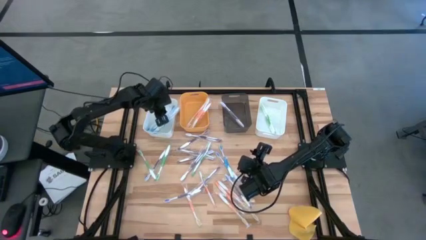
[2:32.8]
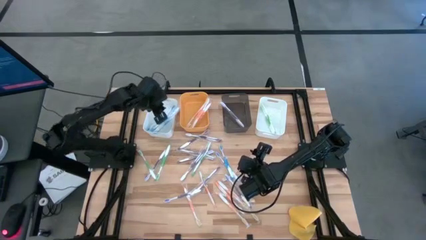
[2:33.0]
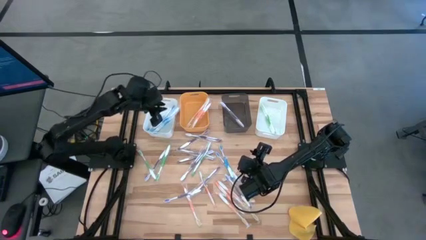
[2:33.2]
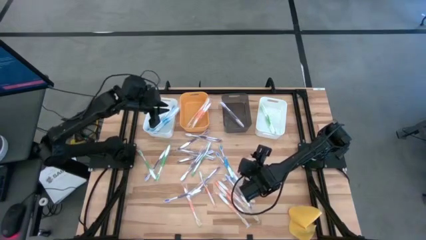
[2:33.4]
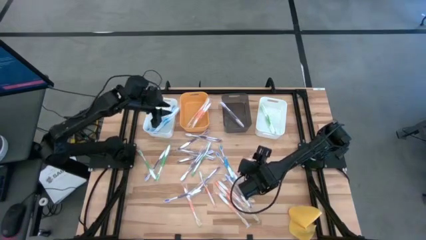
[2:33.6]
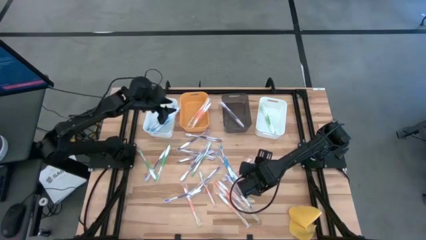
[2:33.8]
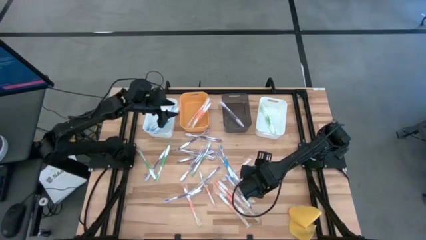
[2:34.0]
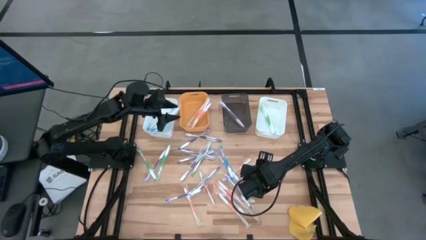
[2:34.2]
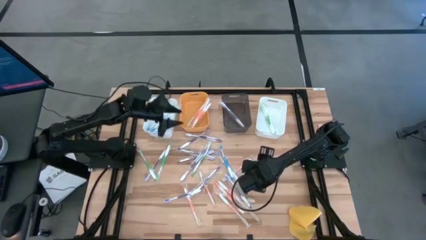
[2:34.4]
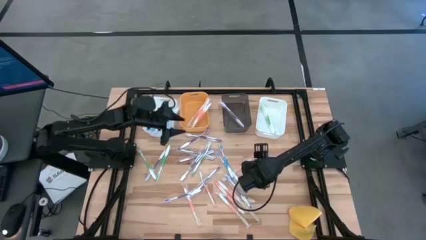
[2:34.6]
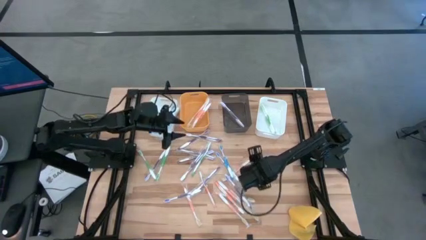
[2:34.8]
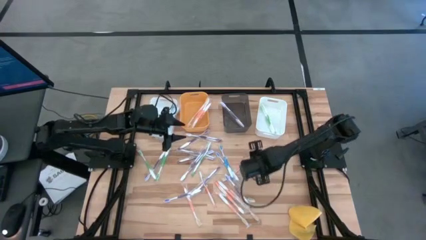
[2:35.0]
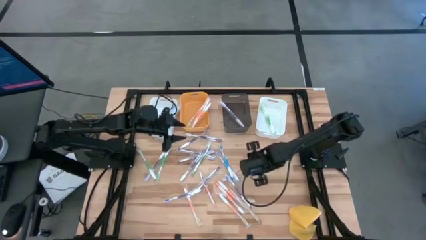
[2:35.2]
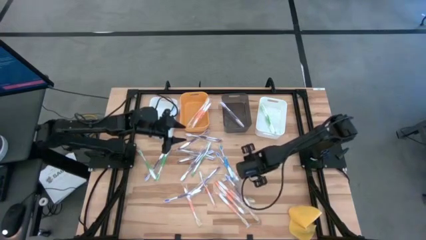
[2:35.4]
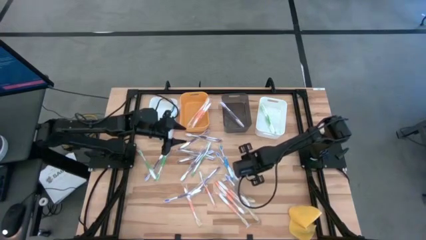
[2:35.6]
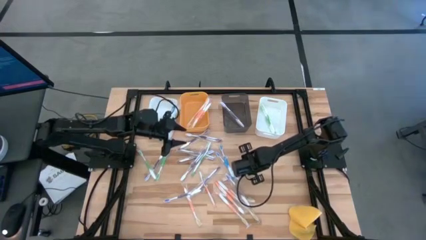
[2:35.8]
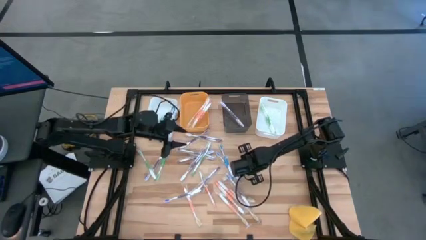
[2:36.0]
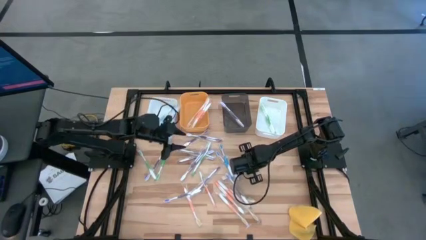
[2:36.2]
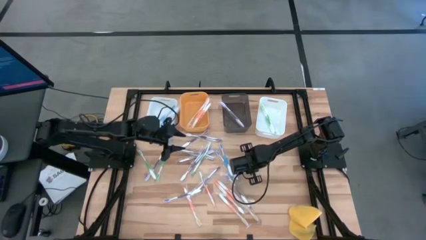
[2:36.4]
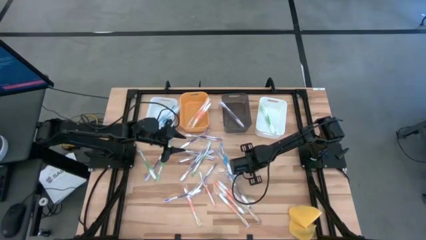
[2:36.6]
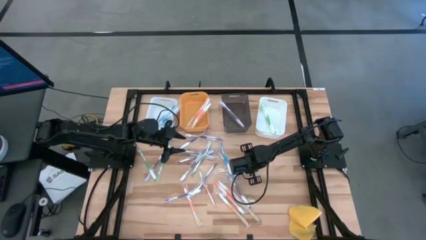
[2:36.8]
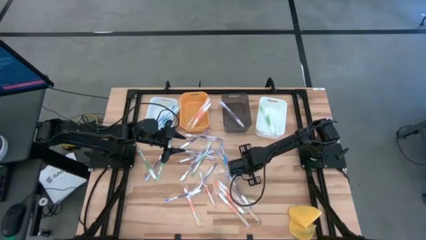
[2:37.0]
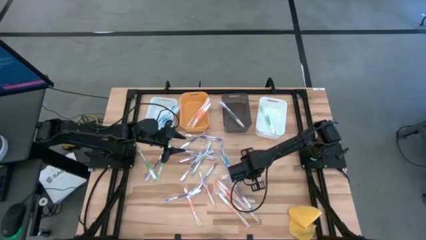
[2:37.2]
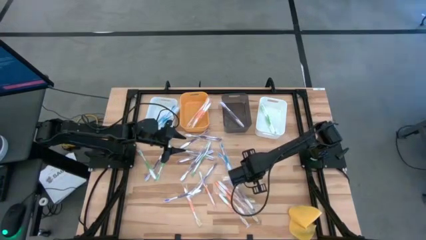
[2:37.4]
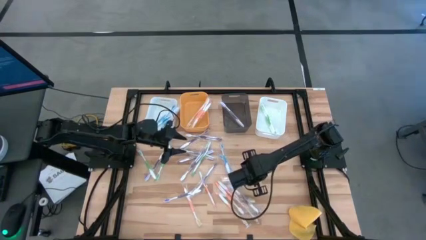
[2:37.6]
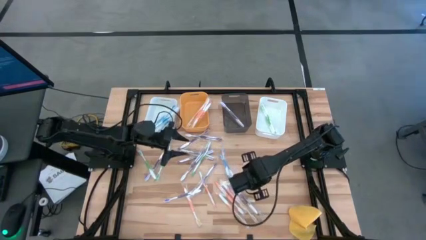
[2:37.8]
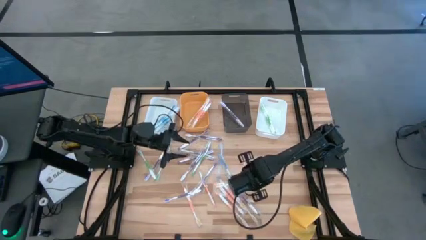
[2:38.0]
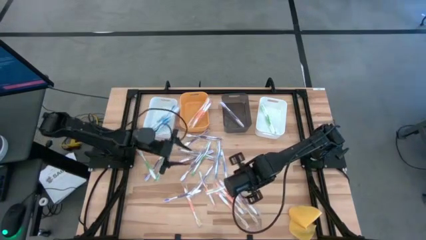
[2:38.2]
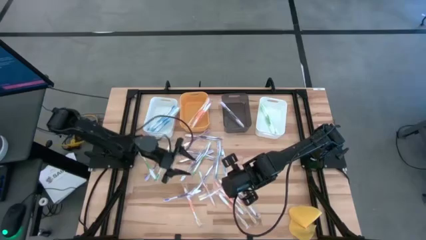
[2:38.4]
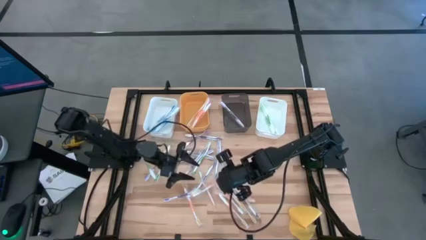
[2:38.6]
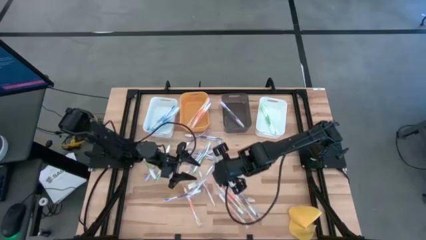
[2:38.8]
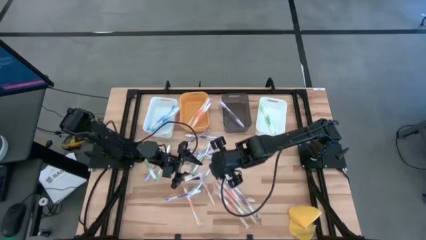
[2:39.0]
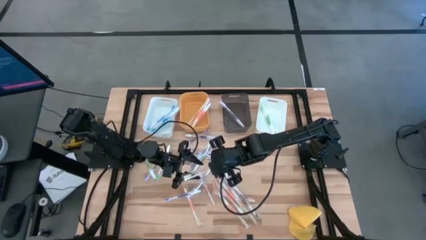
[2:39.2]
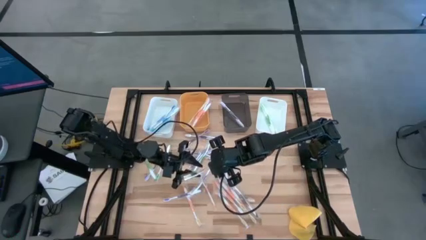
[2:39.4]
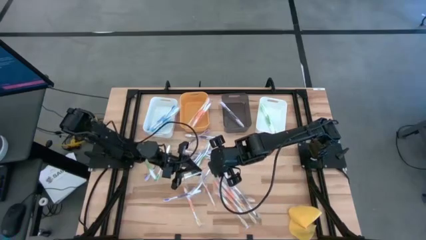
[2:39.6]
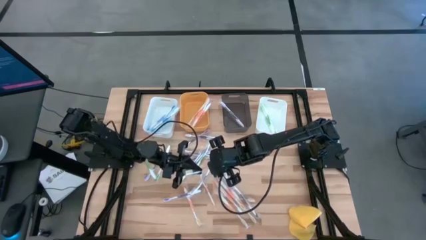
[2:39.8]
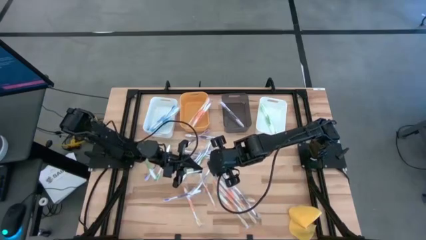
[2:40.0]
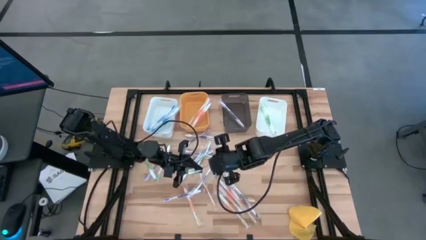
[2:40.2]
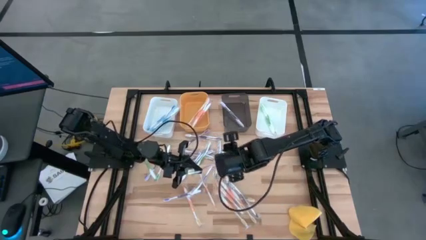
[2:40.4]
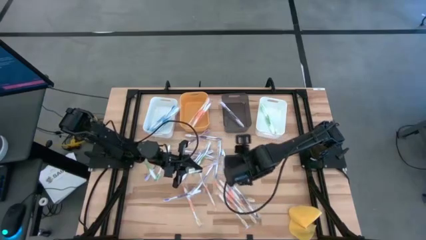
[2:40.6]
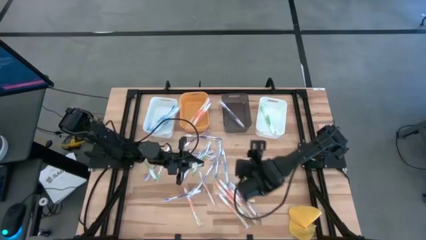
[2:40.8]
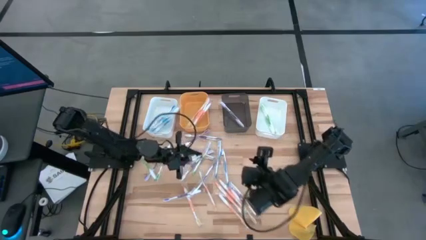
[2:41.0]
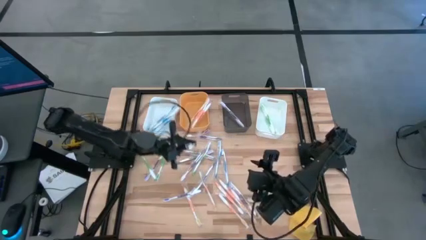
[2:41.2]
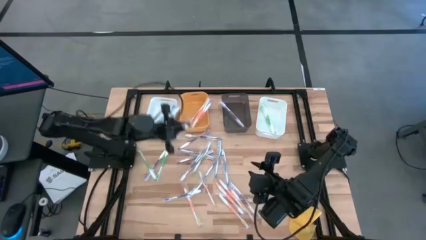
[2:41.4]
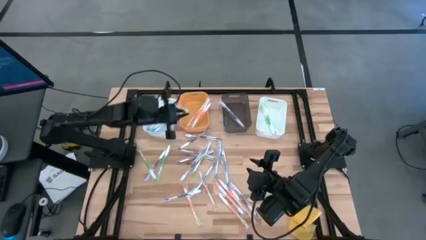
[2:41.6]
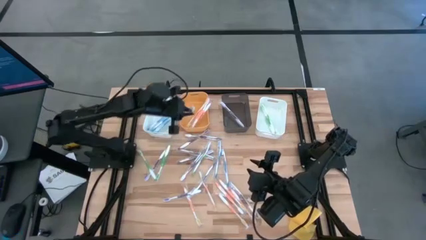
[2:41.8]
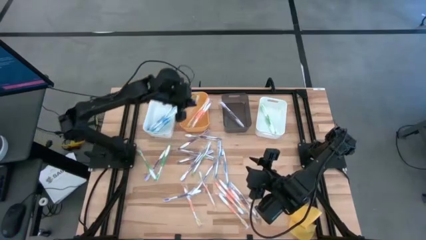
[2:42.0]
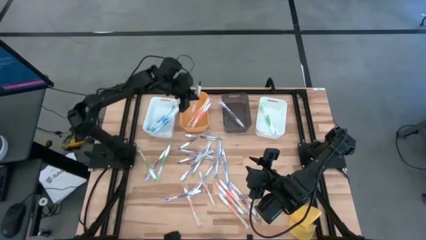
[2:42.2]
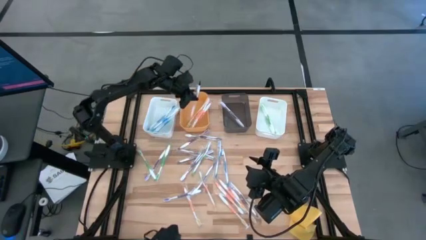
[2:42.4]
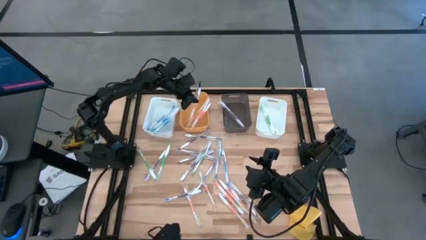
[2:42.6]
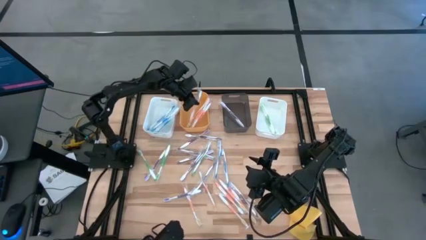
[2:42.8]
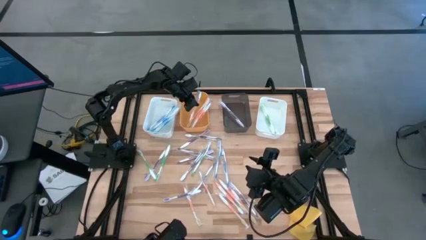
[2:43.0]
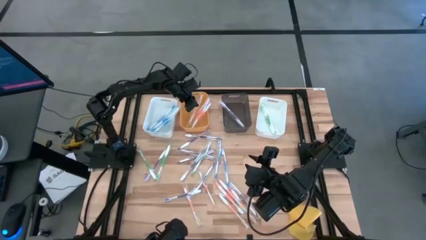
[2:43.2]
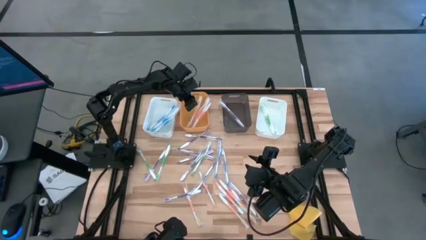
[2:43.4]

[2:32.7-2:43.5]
Task: Pick & Place Toothbrushes
Put the orange toothbrush into the yellow bin

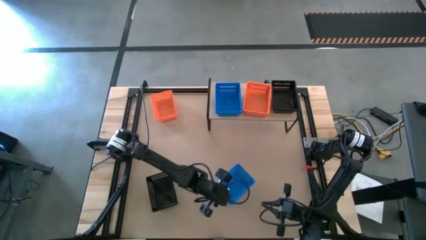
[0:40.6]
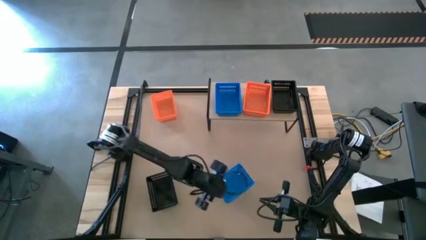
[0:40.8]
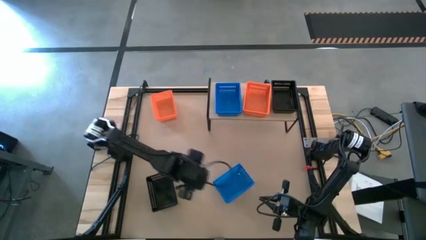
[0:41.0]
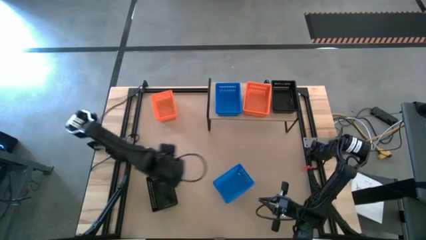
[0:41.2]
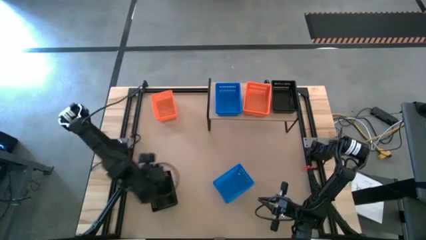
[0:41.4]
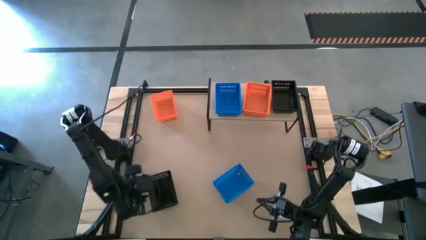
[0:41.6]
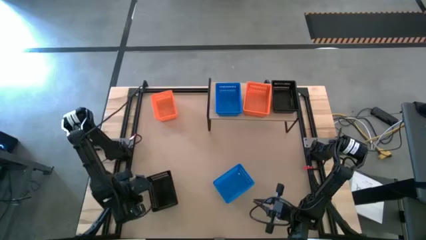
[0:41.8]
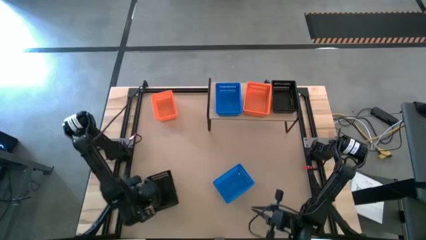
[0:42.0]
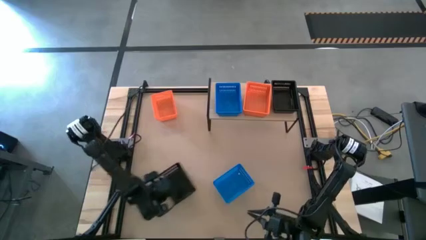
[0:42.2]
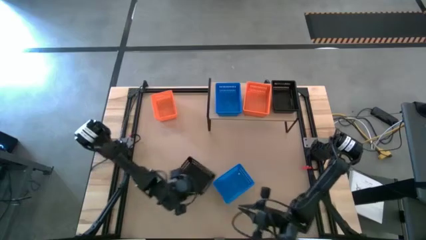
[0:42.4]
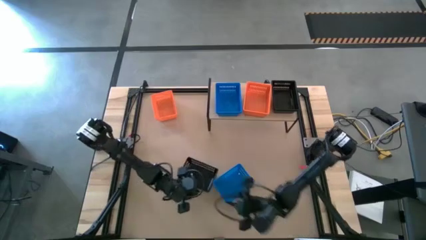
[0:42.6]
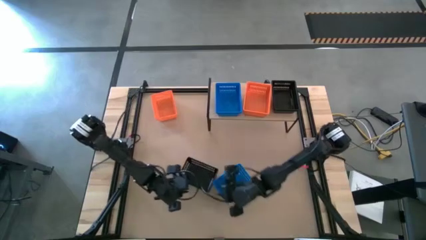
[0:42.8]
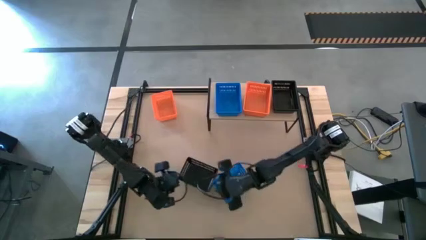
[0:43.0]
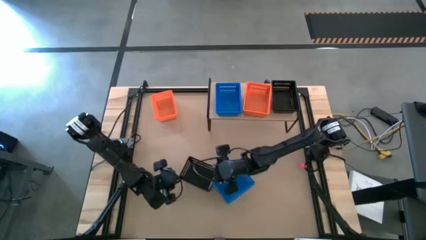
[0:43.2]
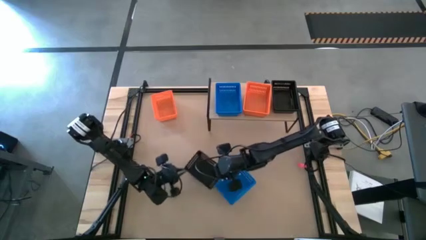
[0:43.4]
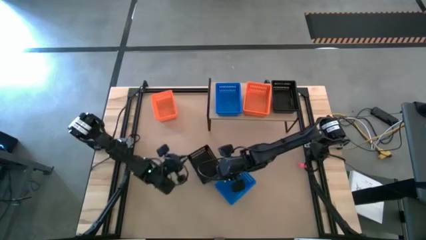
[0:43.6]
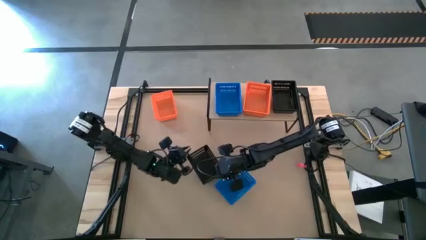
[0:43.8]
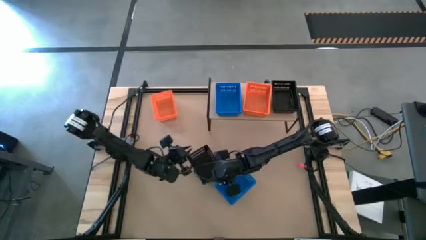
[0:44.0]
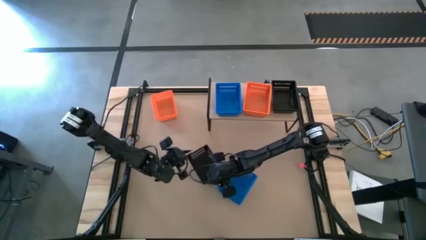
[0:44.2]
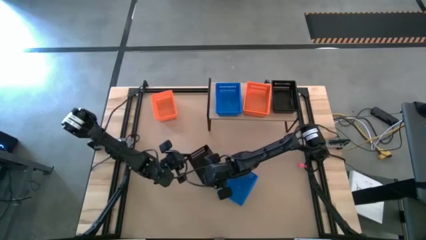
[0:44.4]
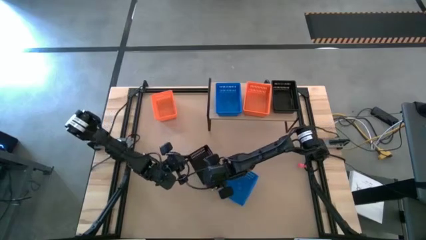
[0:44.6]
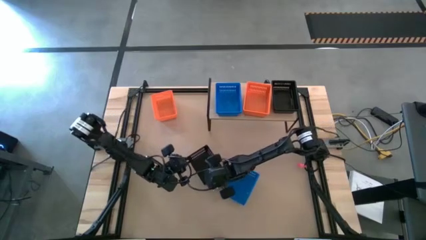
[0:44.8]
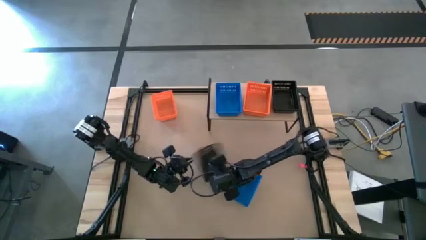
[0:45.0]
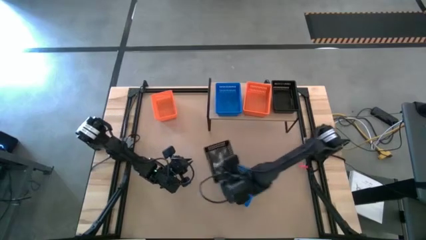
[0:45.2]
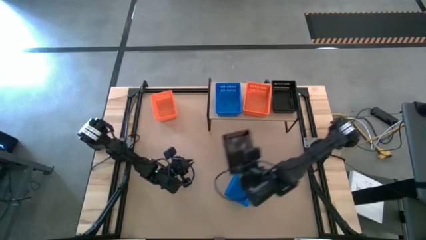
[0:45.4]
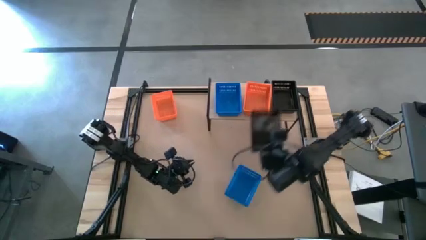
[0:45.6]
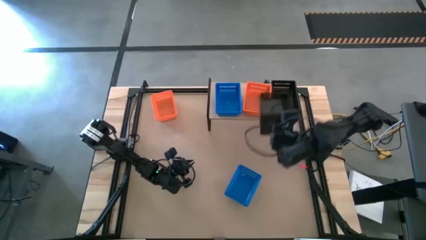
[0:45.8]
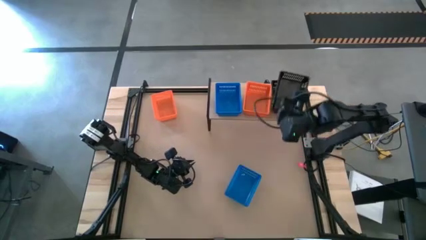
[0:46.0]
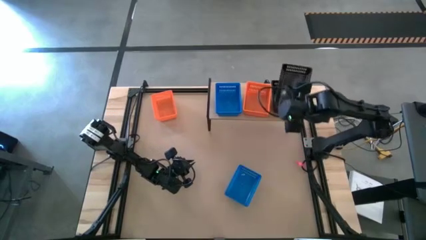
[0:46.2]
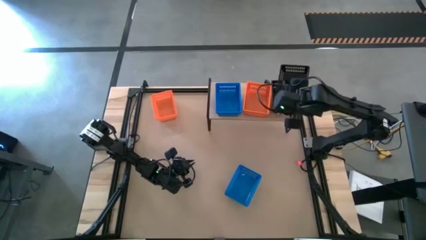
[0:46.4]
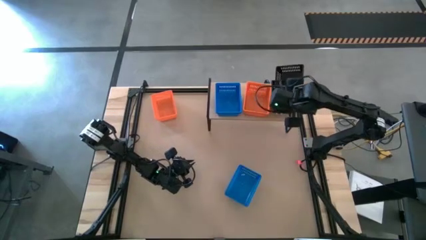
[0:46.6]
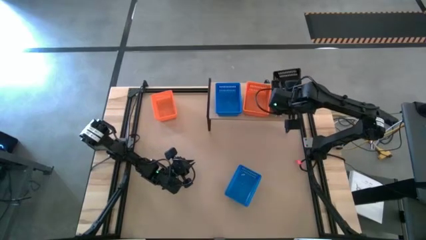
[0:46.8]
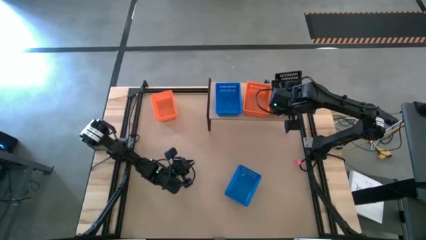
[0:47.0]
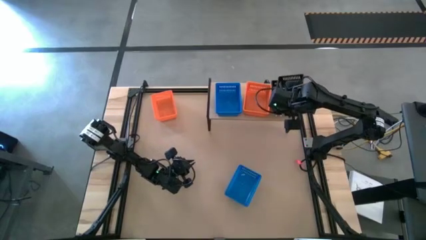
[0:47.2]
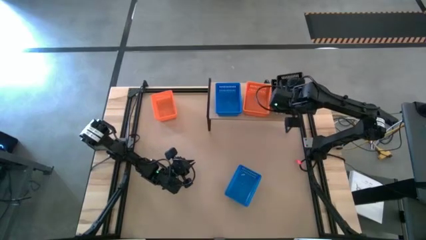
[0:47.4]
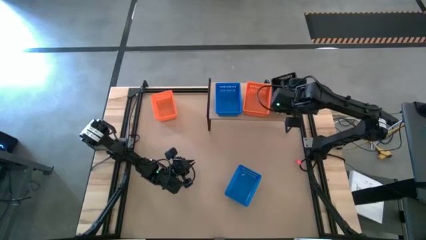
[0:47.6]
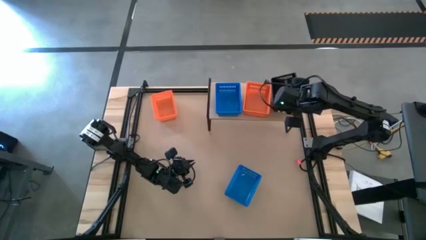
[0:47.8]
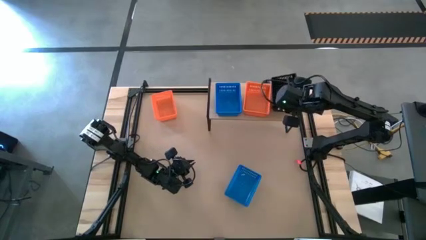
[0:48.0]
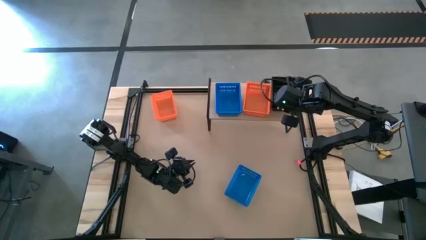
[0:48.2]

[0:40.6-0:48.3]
Task: Stack baskets on shelf by color
Stack the black bin on top of the black bin on the shelf
